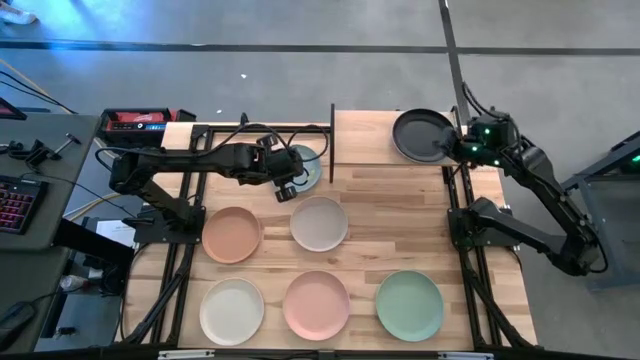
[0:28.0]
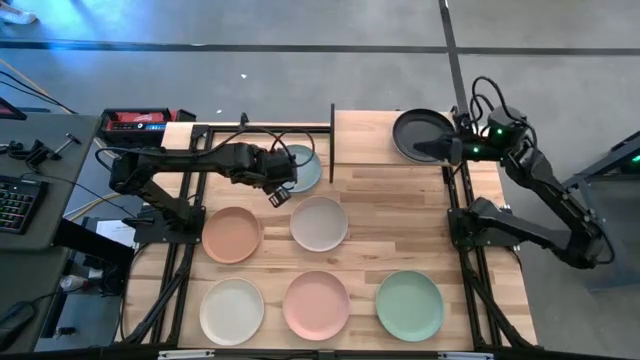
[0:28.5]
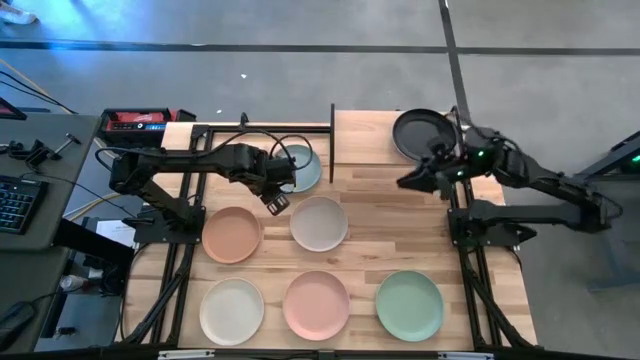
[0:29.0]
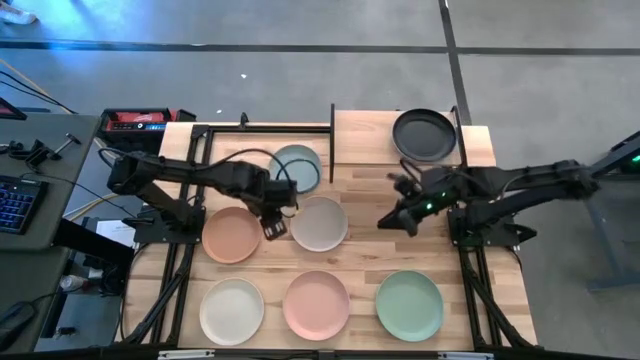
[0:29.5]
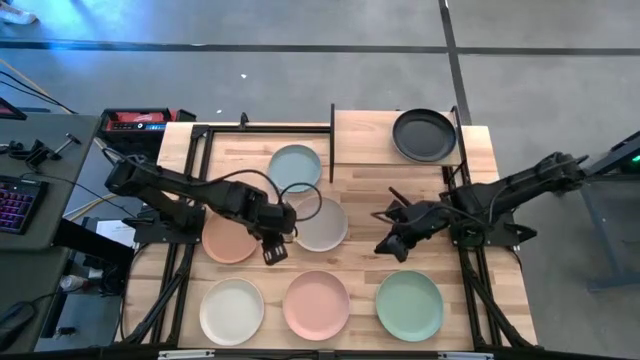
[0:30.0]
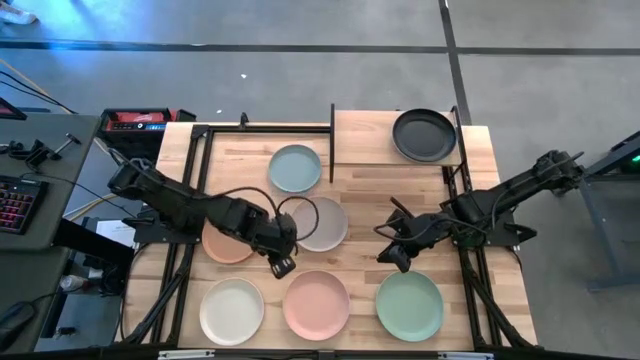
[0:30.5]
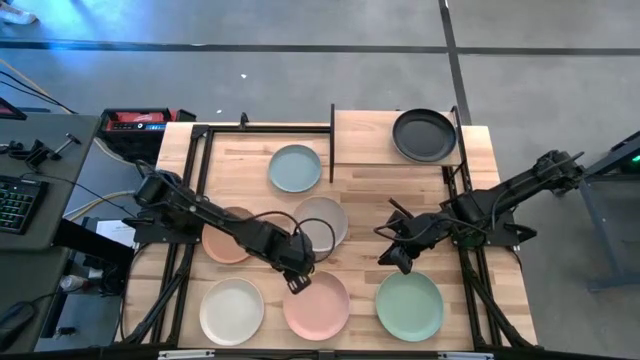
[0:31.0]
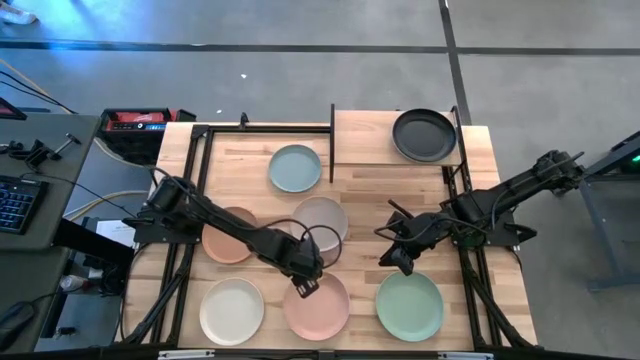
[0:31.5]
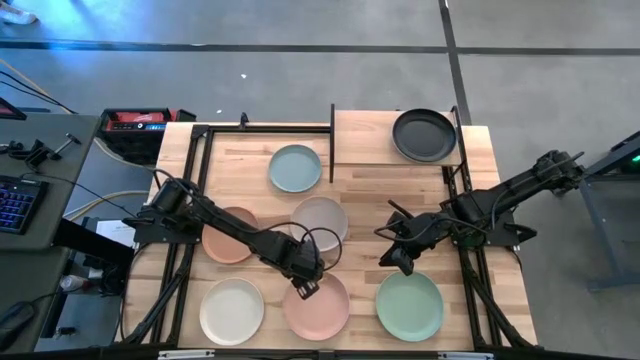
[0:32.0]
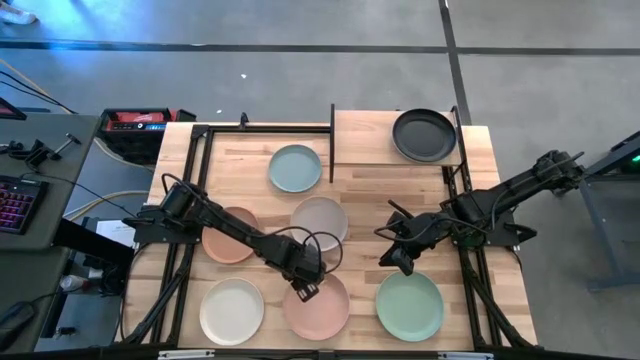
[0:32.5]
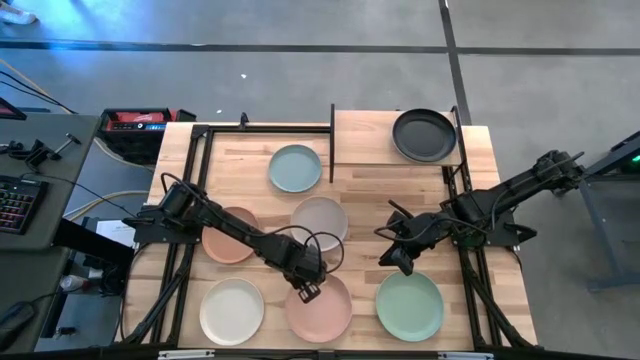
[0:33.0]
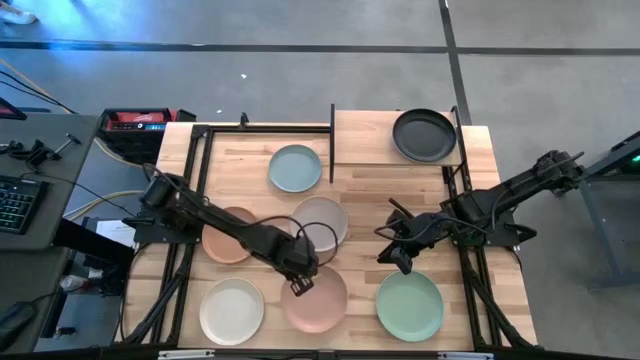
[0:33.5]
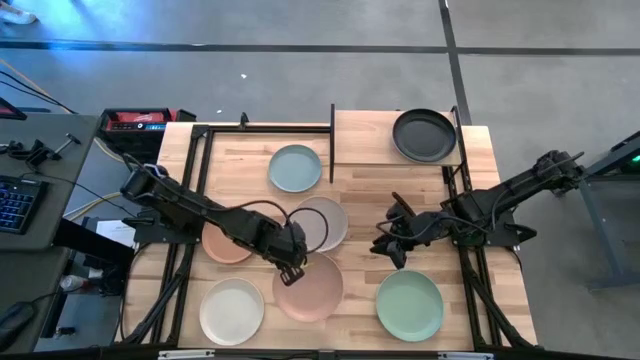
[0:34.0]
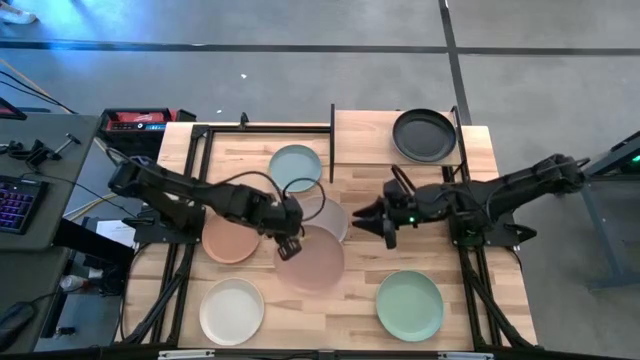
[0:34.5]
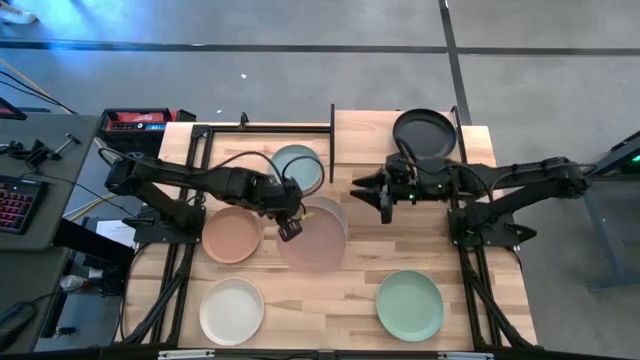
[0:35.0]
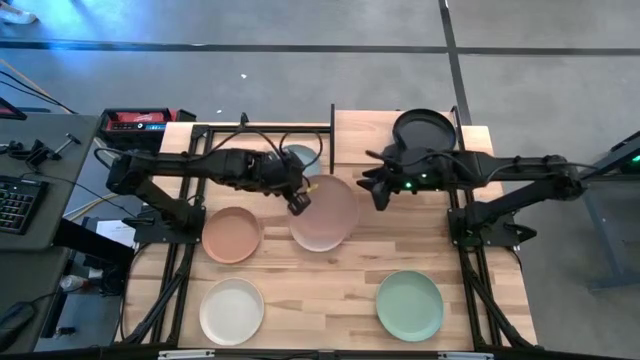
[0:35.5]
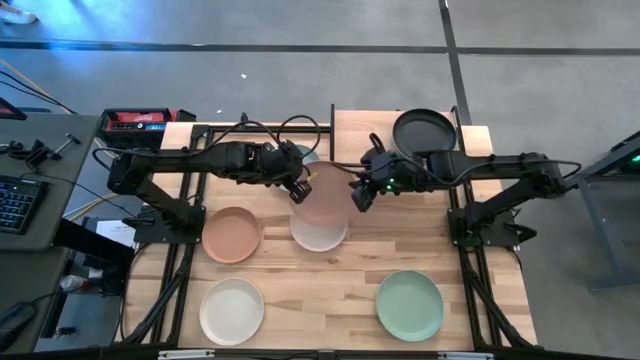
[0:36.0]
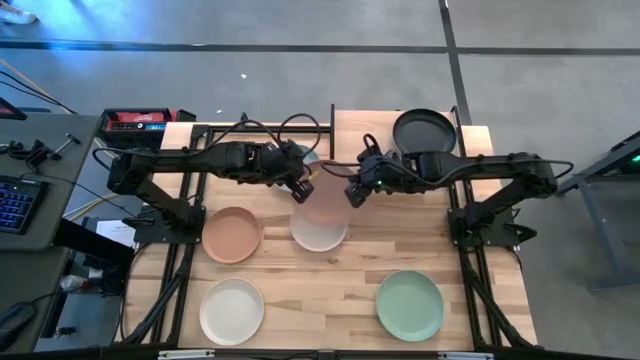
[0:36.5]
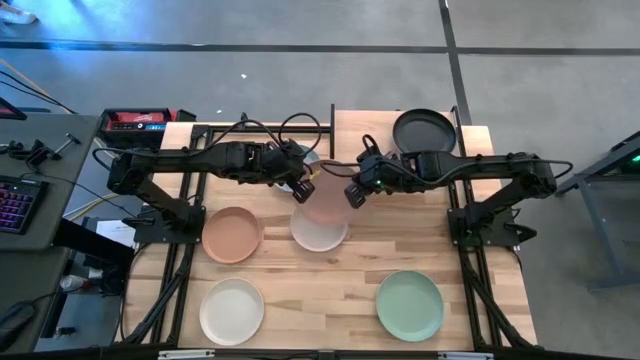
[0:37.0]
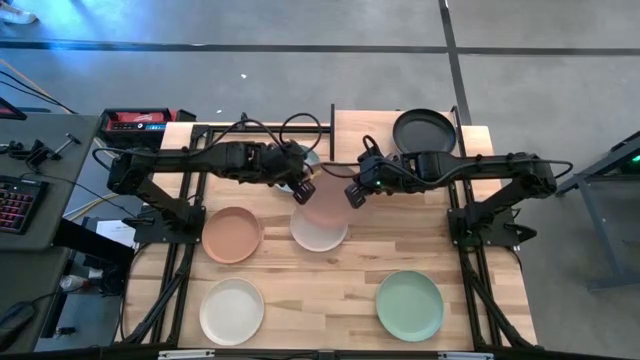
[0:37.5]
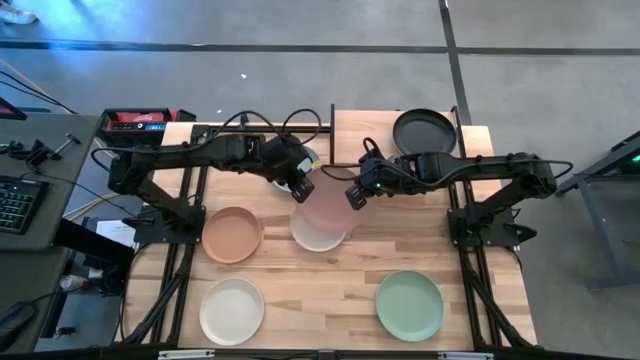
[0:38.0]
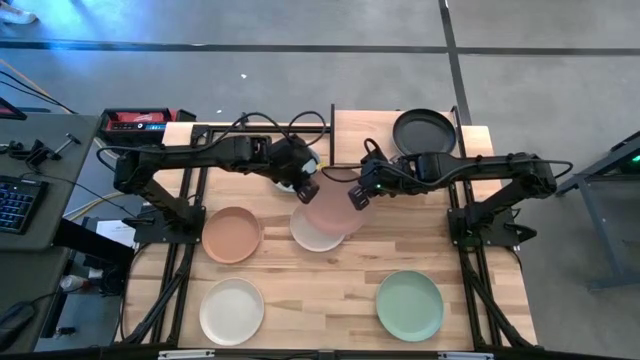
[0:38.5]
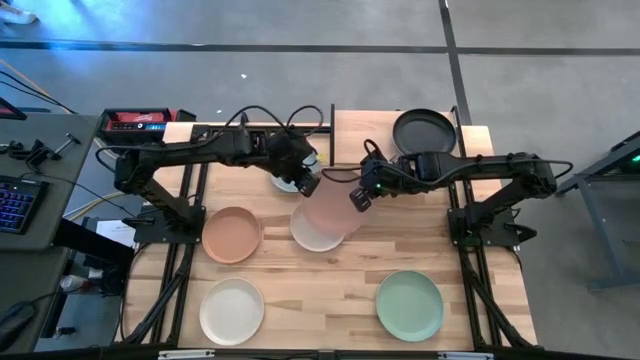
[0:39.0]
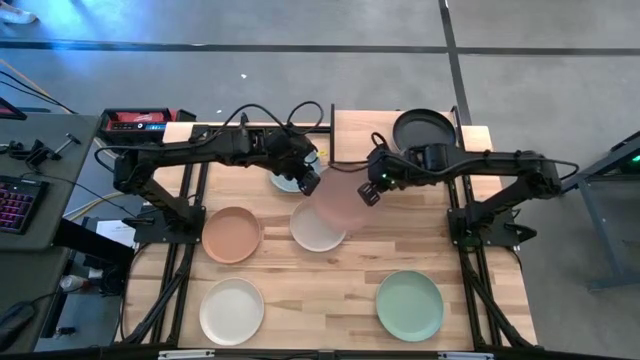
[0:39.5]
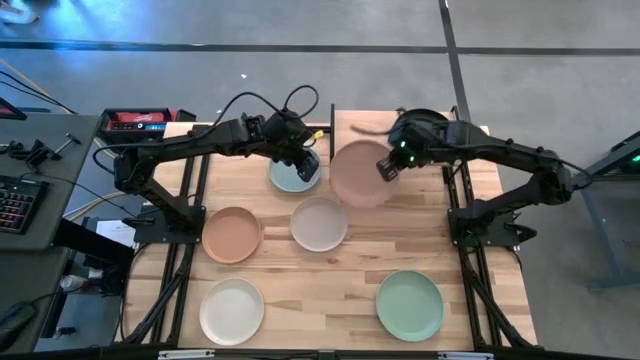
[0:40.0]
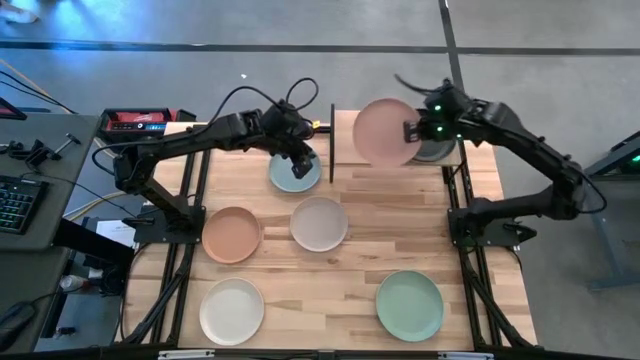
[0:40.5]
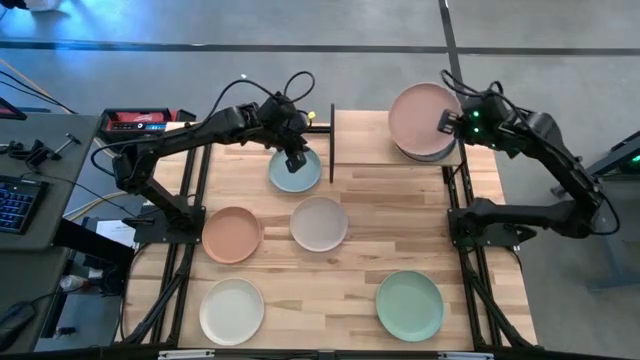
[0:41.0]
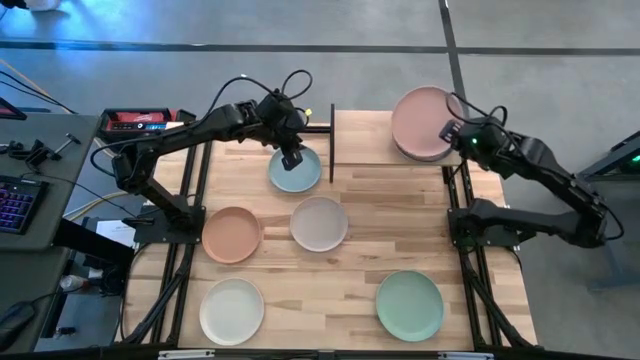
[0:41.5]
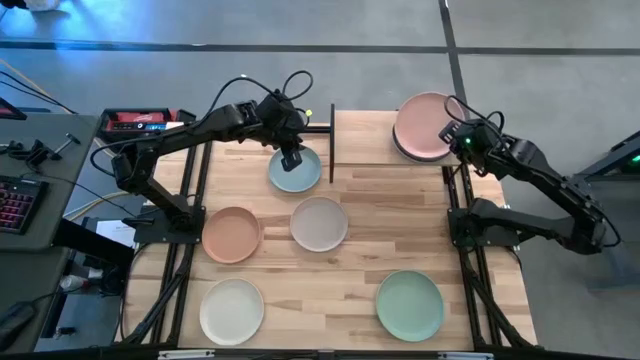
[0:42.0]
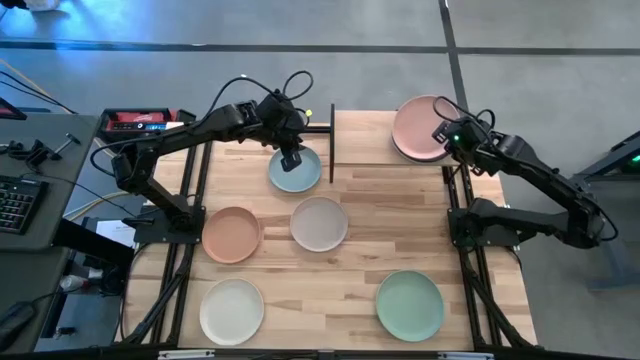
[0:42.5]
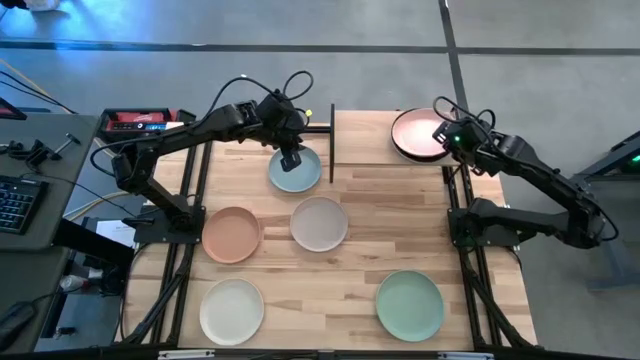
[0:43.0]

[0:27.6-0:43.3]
Task: Place and stack plates onto a shelf
Stack the pink plate on the top of the black plate on the shelf

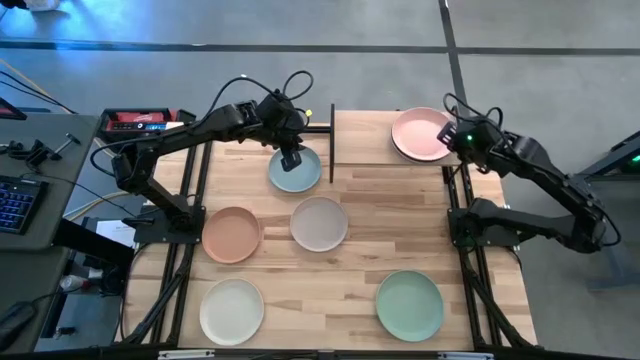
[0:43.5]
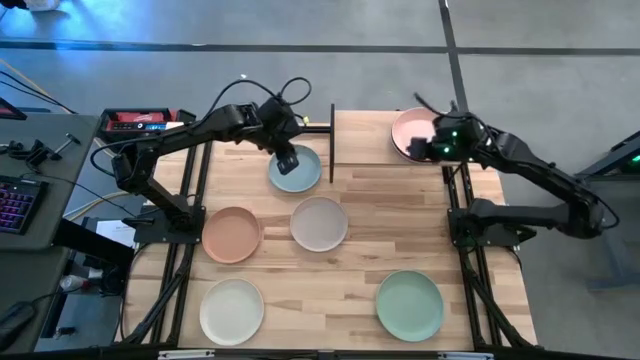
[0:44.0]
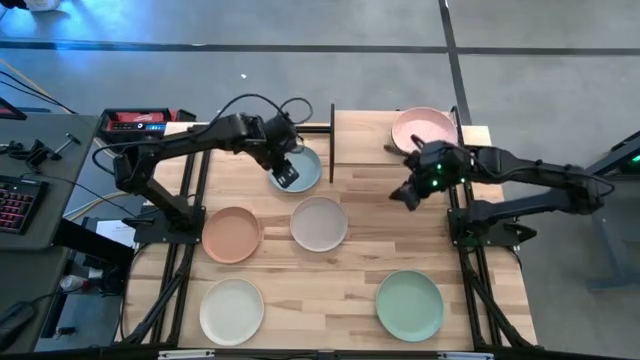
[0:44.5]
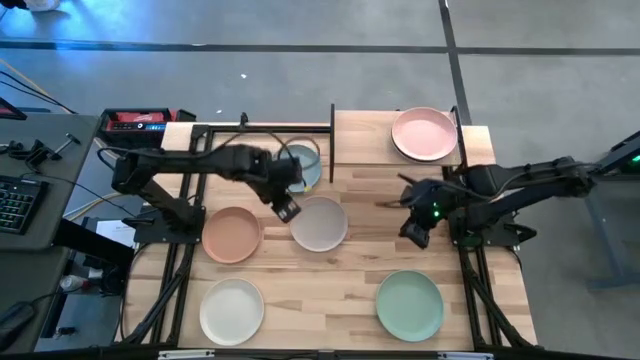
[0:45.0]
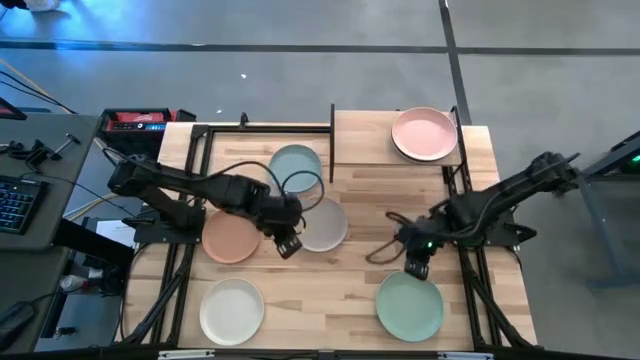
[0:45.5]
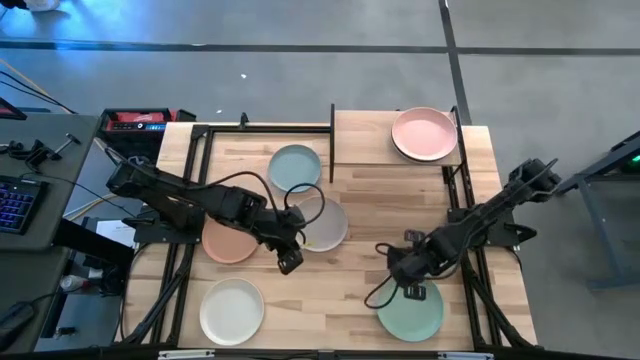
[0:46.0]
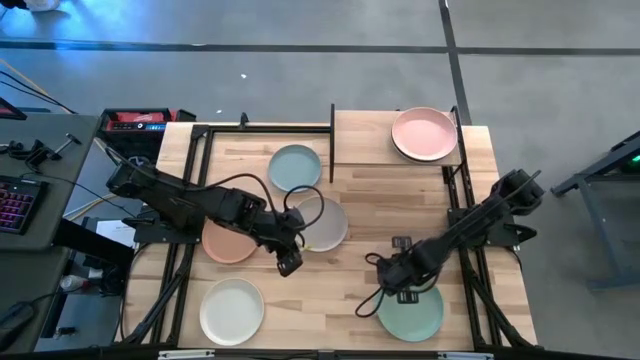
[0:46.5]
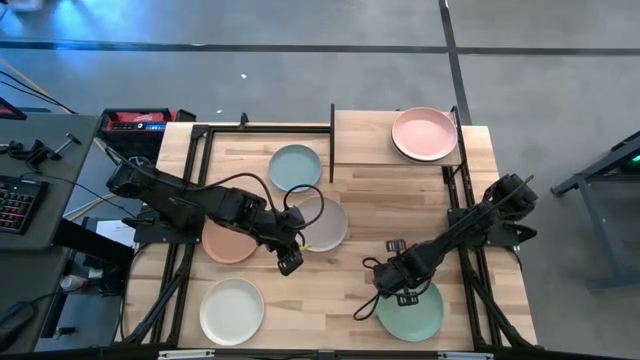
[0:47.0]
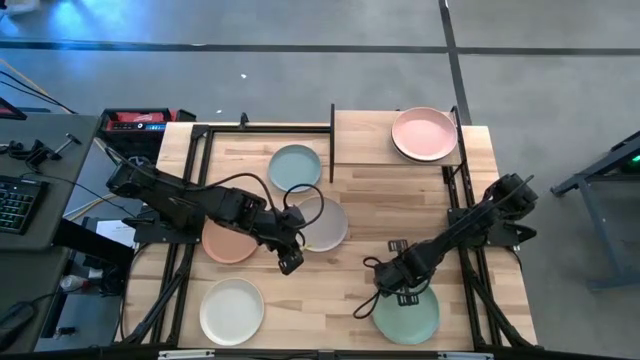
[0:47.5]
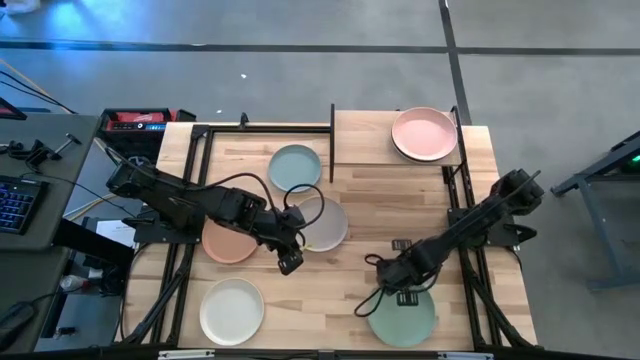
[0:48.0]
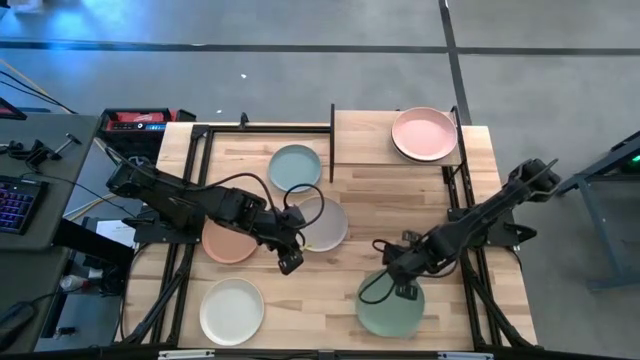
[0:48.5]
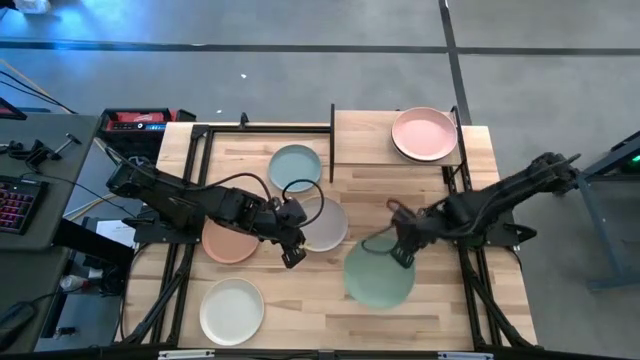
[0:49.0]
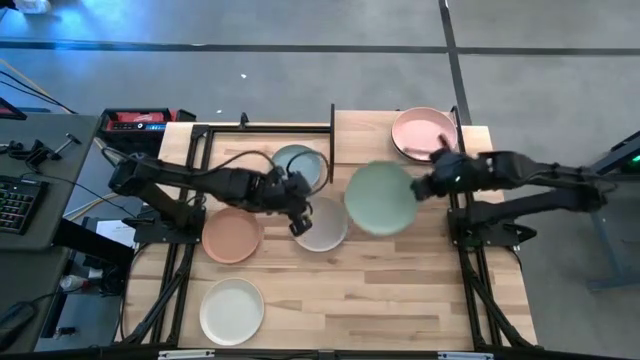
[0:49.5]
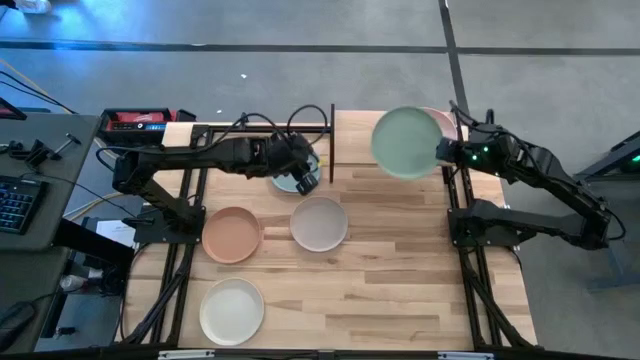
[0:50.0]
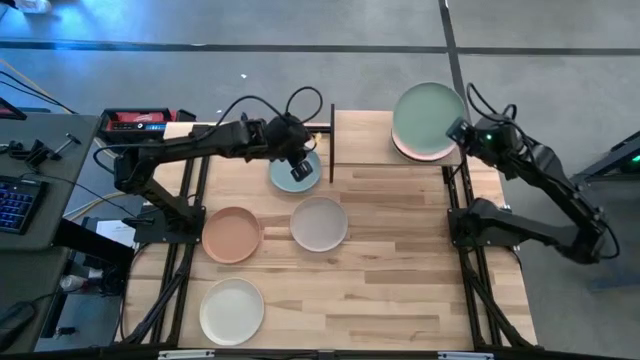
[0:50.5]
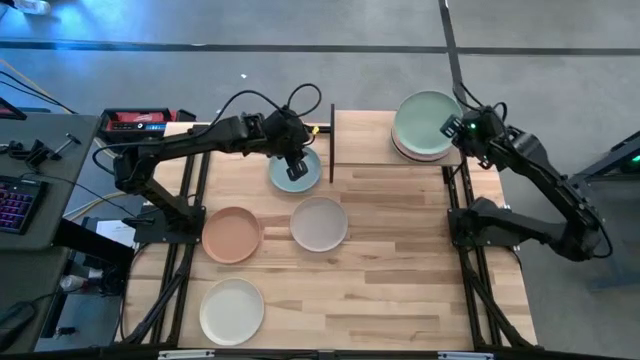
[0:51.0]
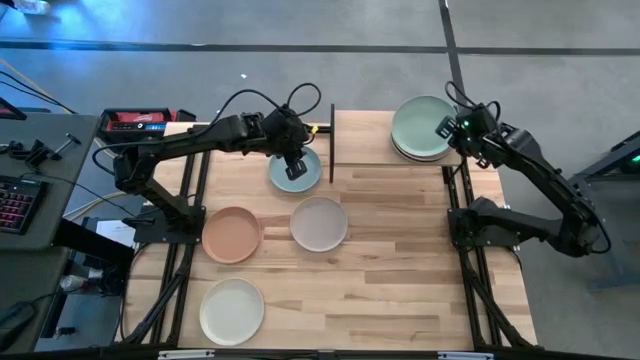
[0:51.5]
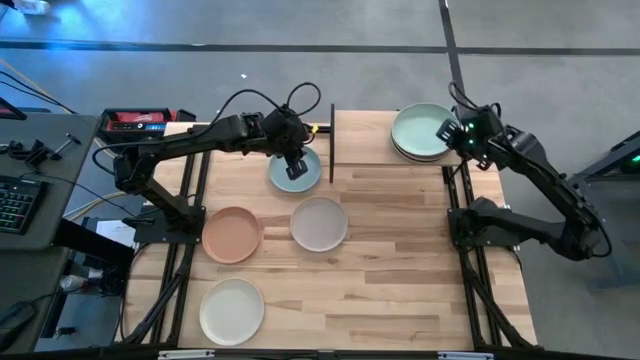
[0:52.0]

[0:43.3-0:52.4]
Stack the green plate on the top of the pink plate on the shelf
